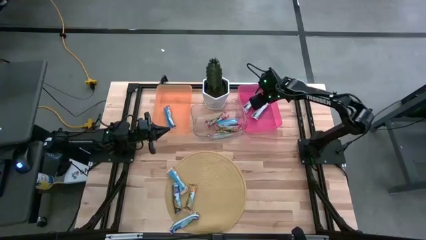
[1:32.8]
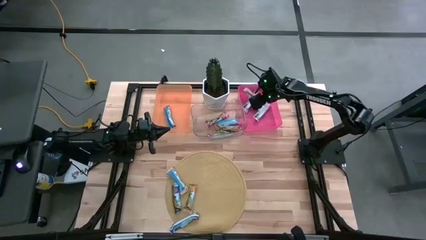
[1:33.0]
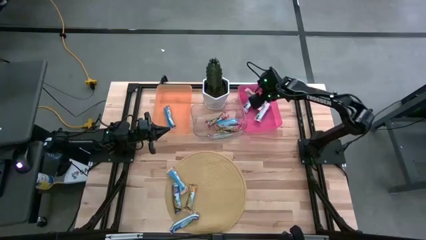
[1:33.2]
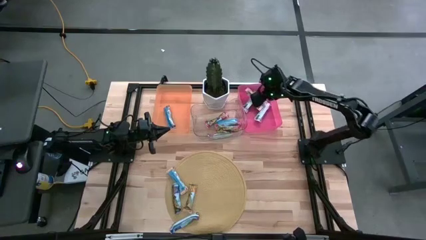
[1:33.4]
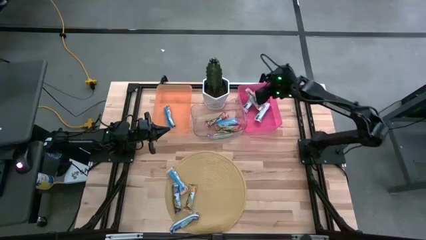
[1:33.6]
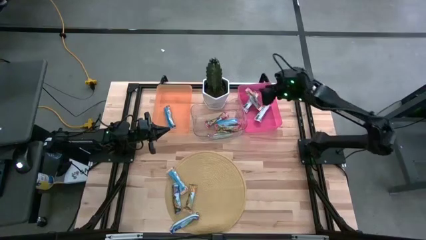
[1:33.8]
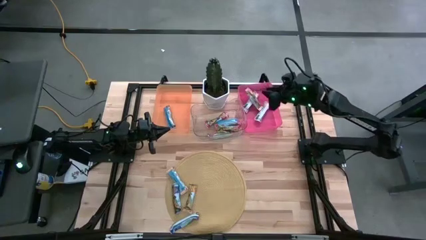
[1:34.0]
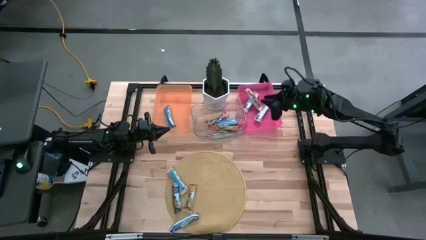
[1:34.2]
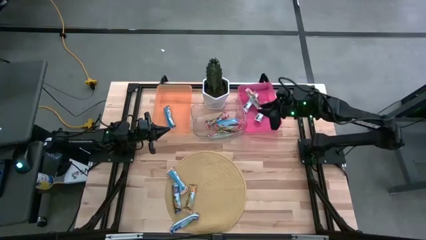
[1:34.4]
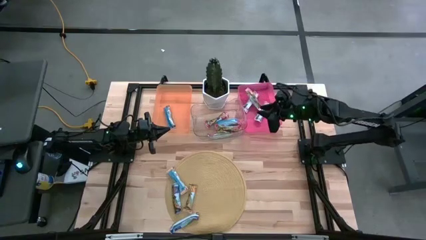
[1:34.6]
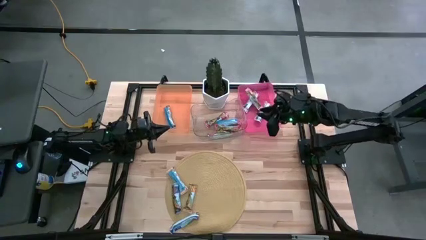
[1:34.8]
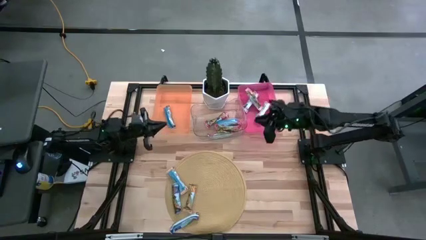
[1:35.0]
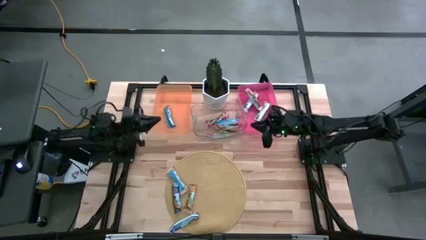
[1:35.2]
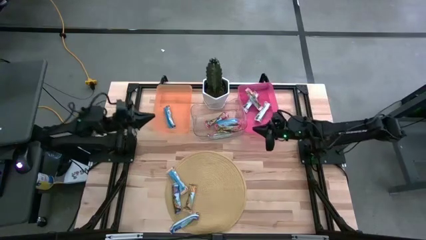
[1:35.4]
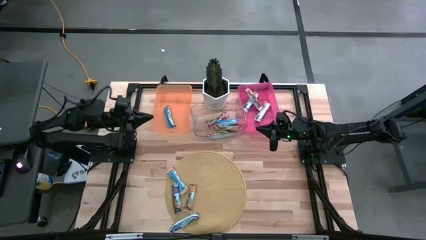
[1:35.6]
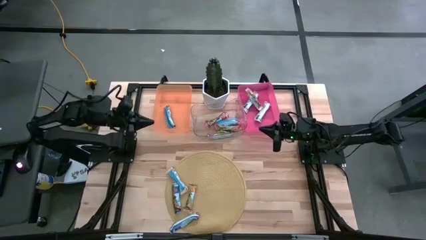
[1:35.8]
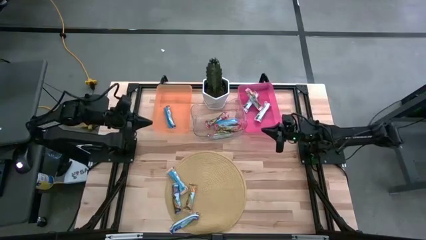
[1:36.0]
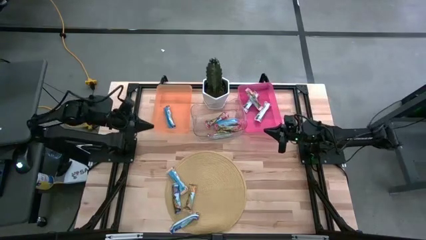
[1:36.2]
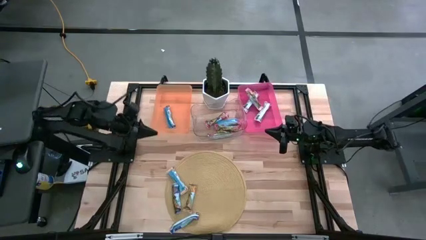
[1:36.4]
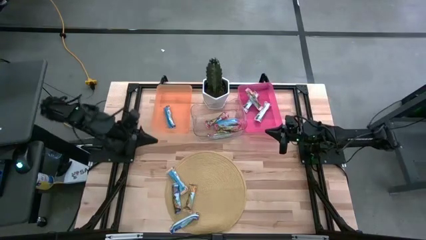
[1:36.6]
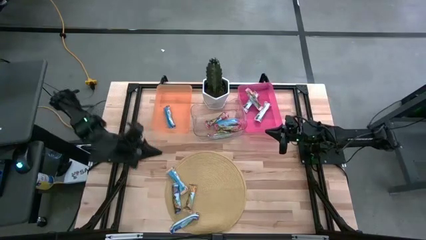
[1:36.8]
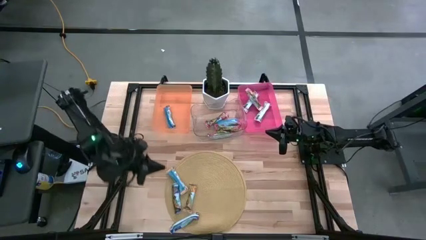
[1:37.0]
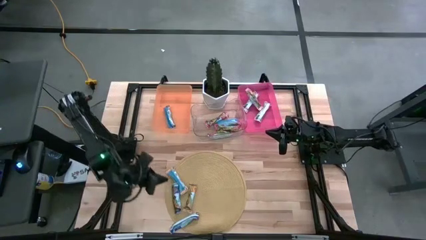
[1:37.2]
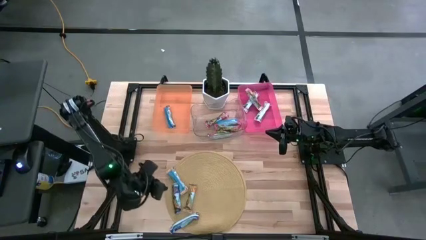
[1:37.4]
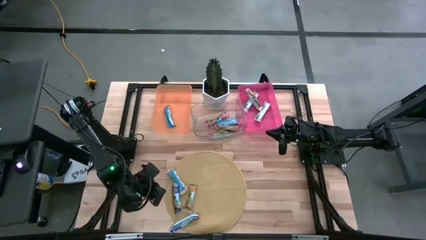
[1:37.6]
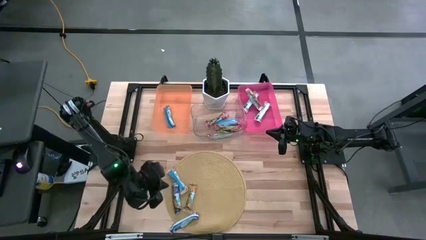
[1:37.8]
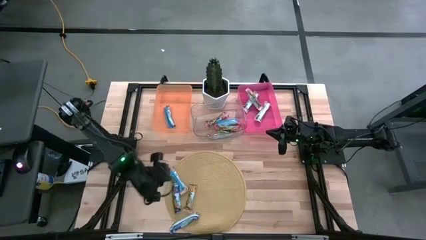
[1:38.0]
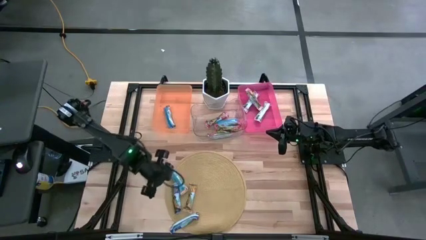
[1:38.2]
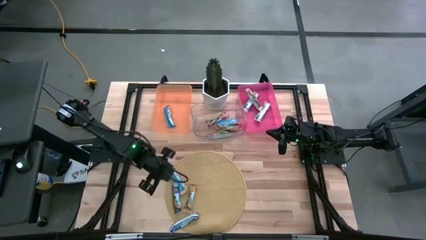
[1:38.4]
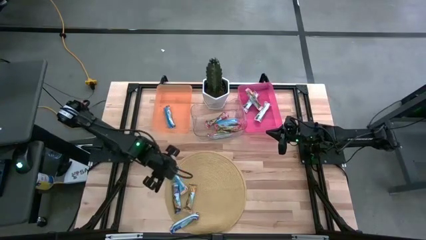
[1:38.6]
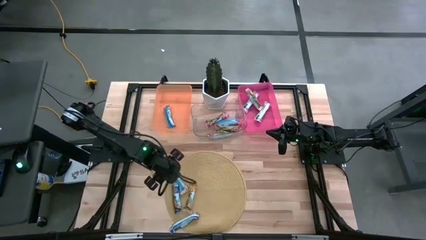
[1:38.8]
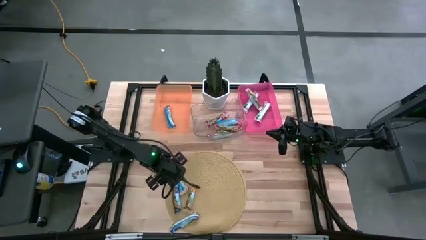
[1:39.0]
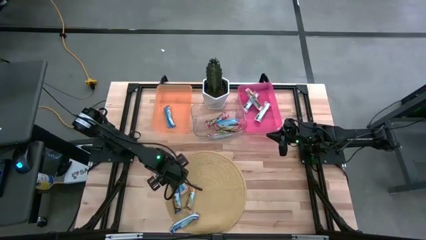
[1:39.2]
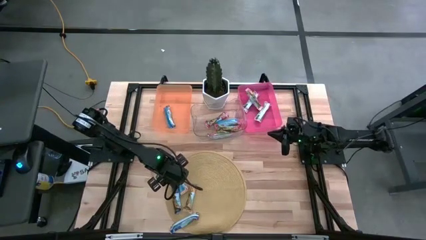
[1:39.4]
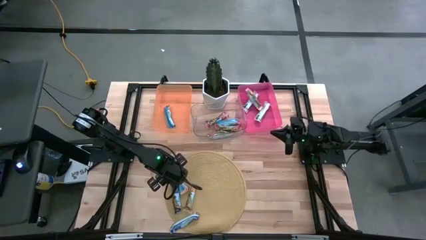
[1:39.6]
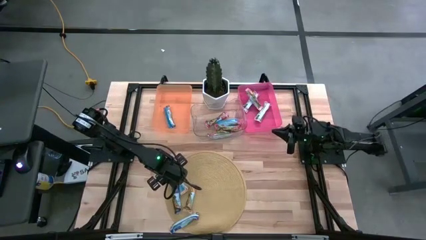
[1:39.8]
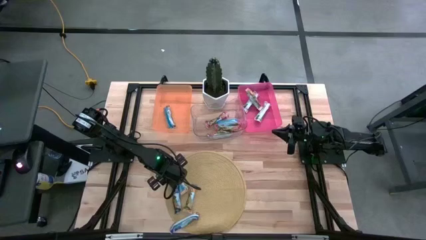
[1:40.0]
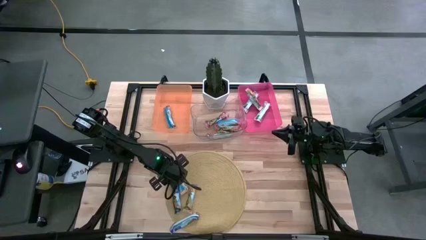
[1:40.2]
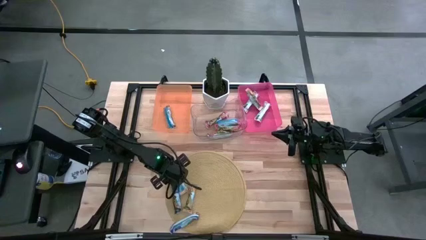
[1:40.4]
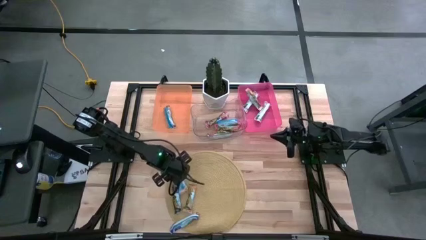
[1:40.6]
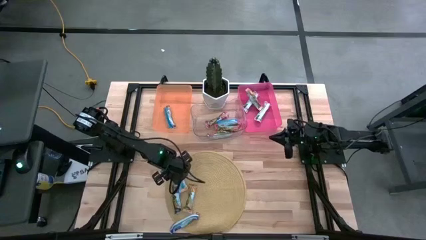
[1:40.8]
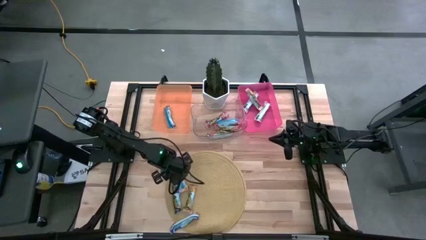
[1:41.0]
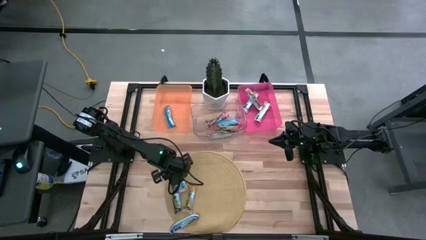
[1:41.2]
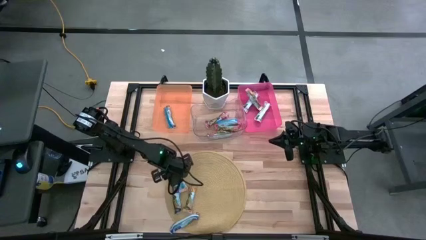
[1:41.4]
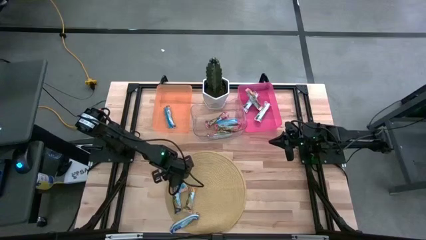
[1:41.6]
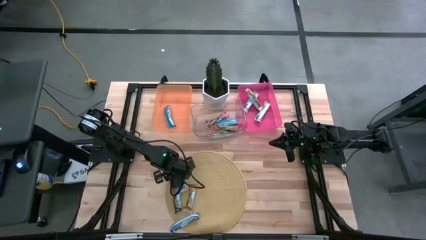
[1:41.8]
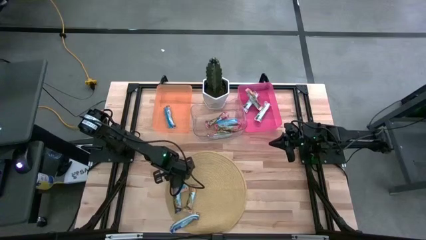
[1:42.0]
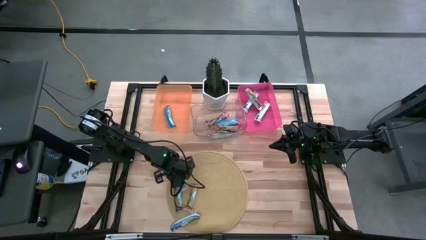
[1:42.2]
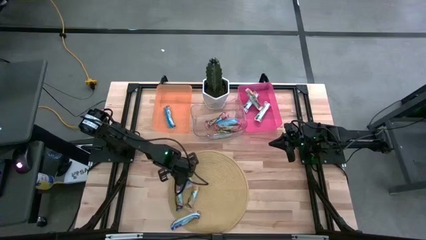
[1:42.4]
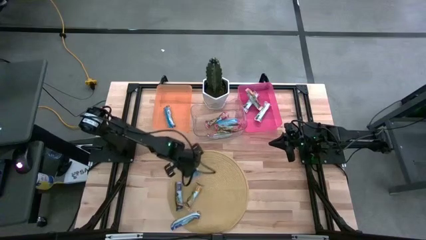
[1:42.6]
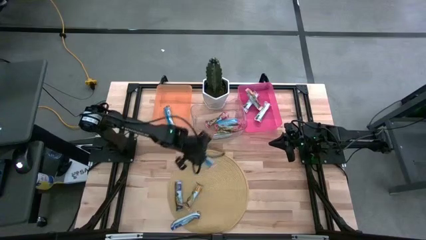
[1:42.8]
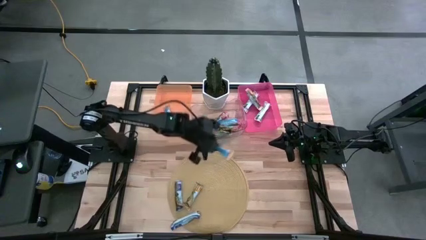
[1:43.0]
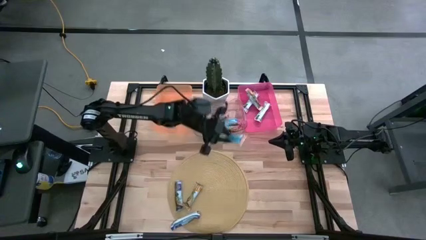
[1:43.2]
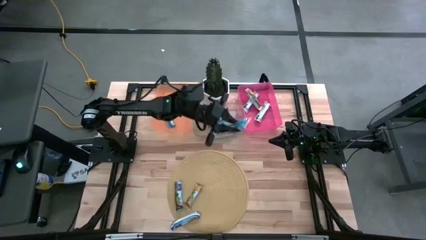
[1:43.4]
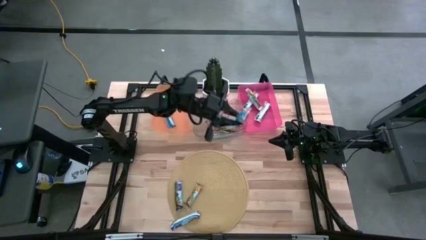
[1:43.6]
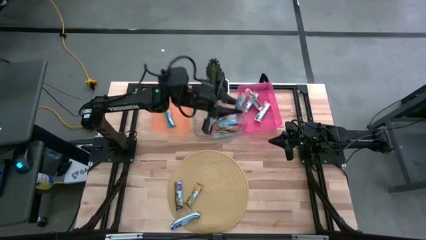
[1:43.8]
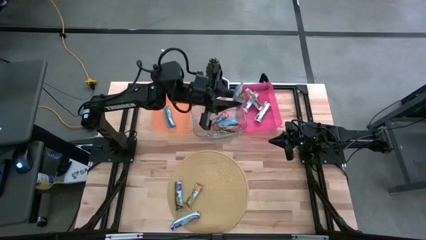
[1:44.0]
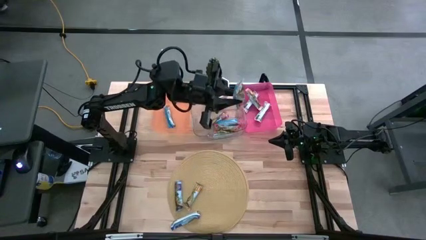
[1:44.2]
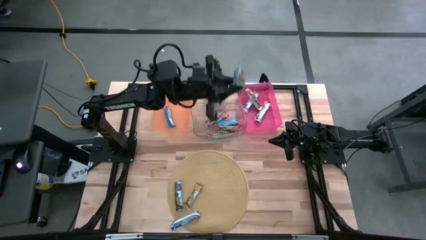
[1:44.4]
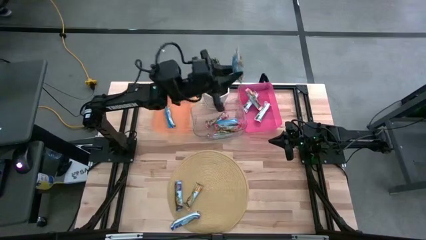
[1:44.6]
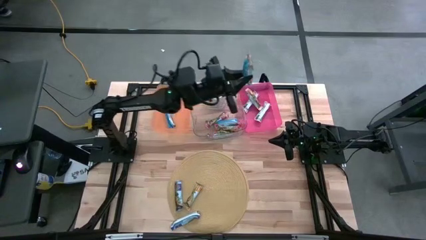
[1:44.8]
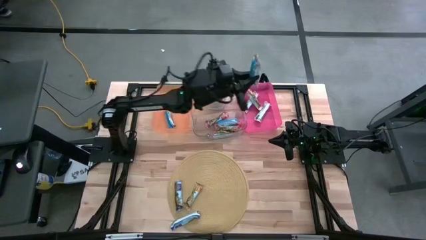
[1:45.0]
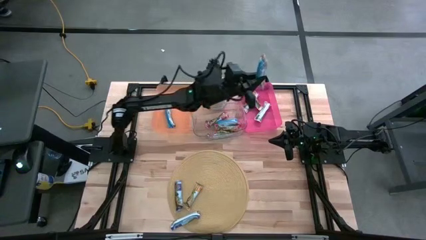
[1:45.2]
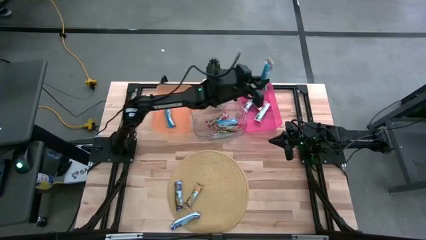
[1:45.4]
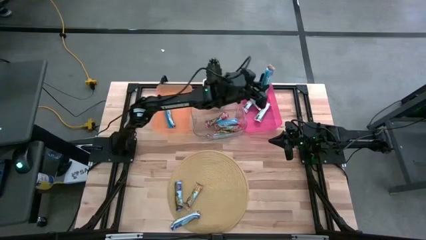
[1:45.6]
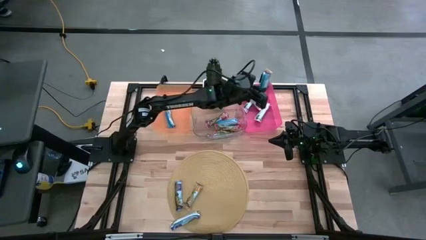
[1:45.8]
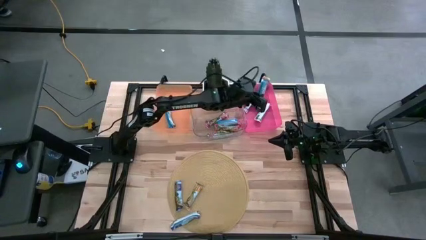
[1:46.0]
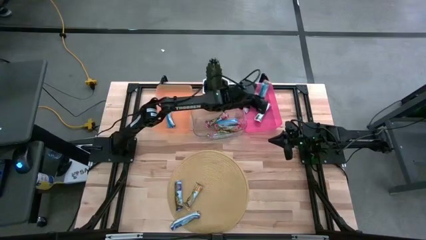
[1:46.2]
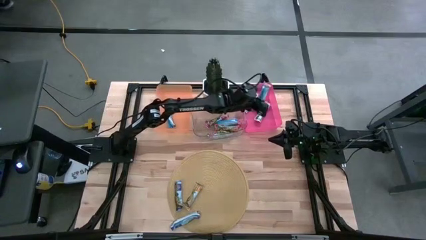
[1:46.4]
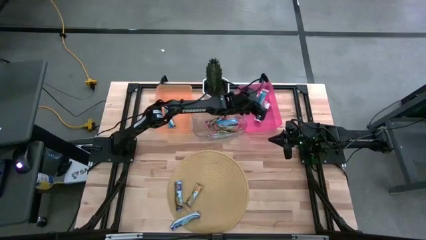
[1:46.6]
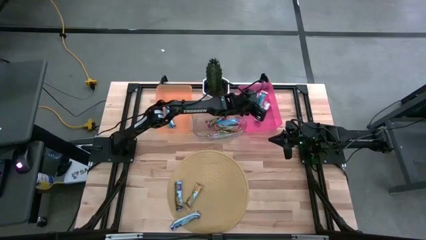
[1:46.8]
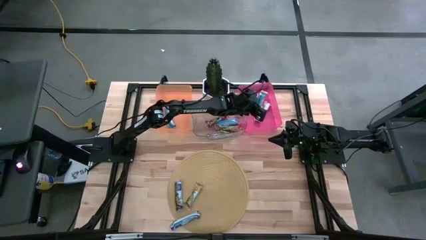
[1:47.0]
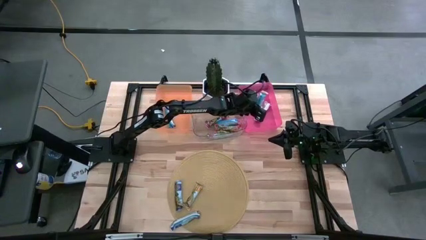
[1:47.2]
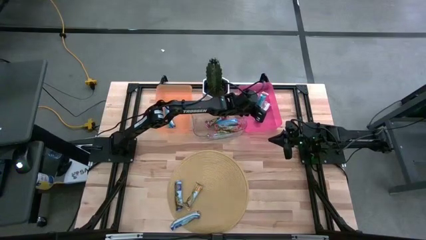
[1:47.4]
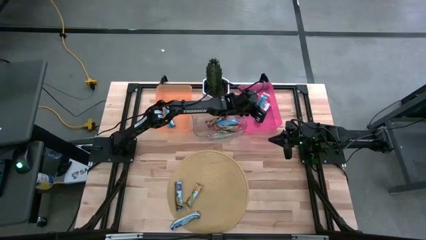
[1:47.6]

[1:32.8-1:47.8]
Task: Pick and place Granola Bars by type
Put the yellow granola bar into the red bin
